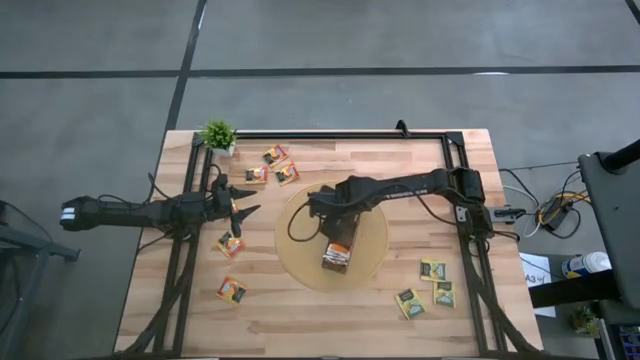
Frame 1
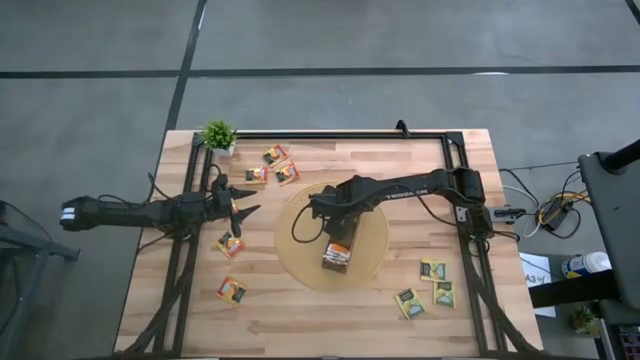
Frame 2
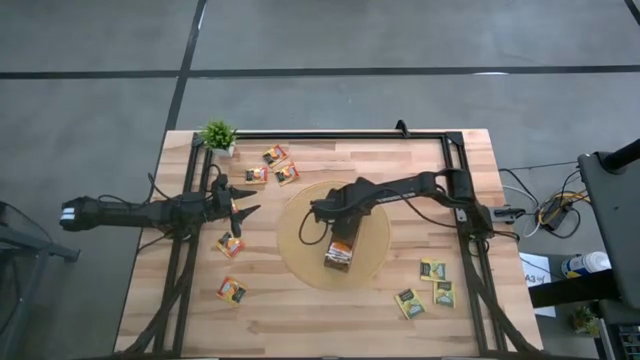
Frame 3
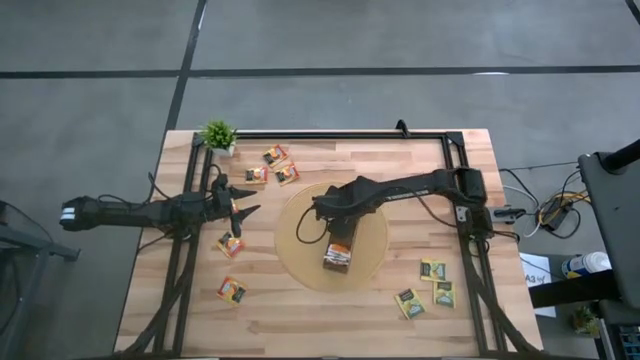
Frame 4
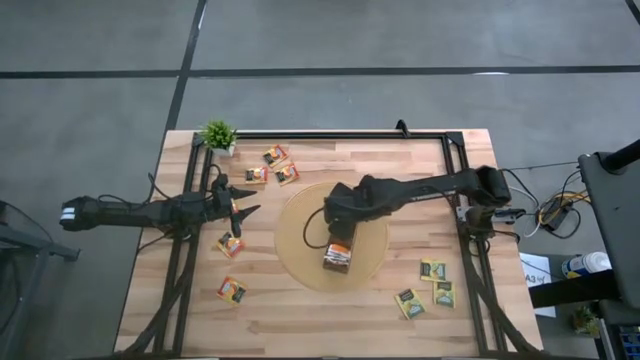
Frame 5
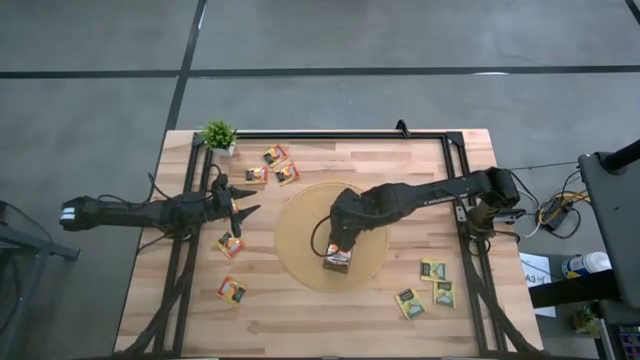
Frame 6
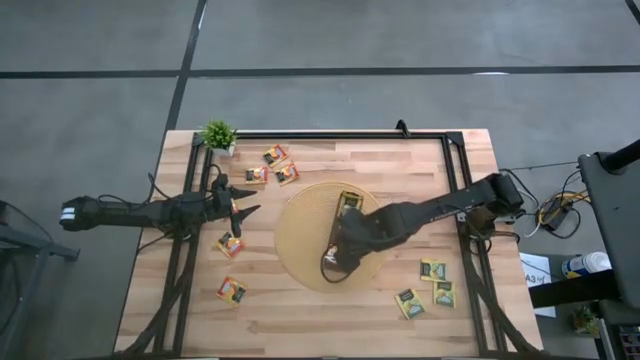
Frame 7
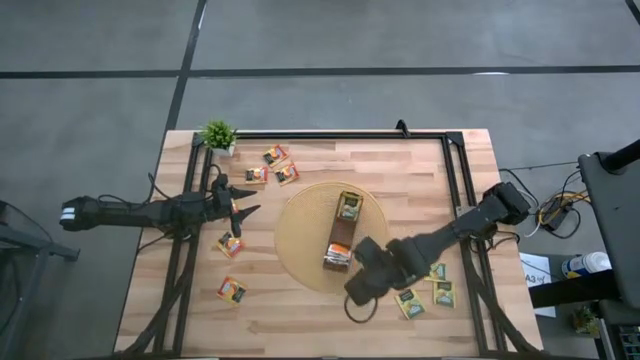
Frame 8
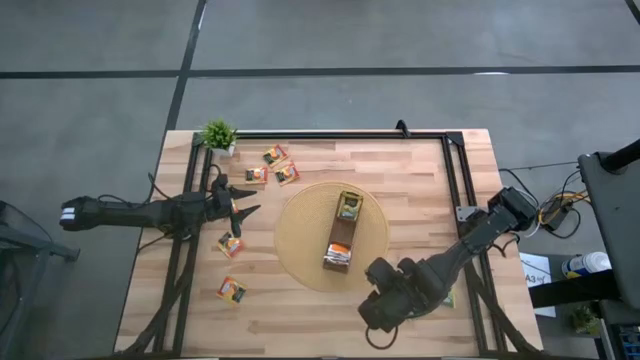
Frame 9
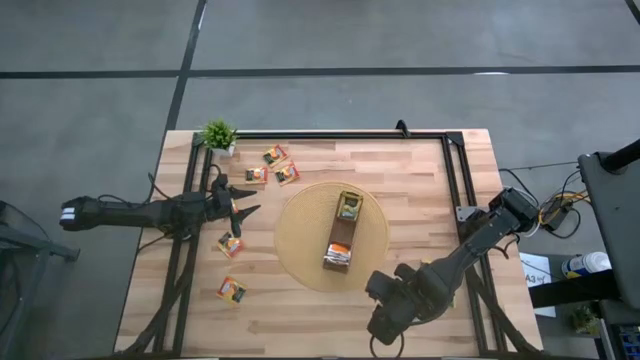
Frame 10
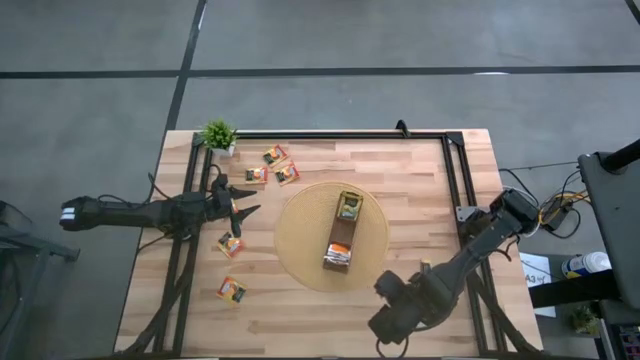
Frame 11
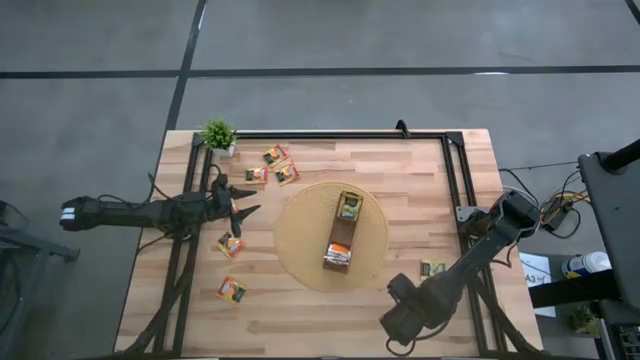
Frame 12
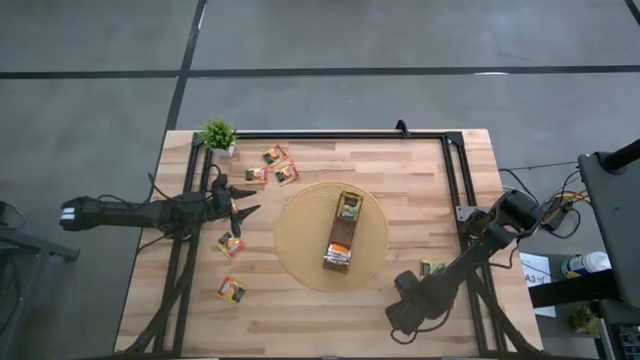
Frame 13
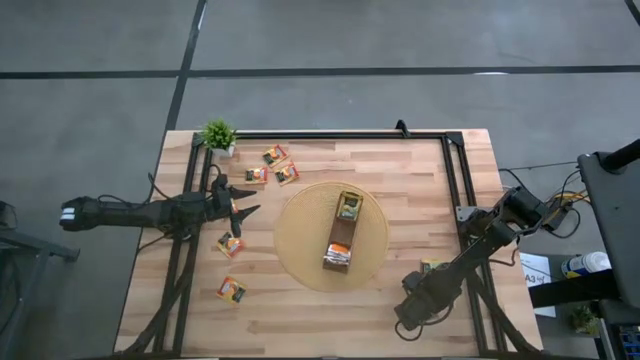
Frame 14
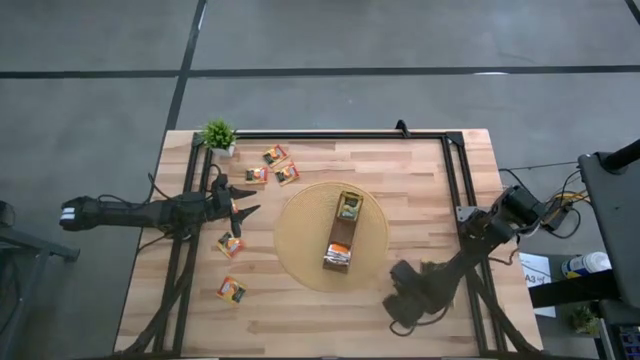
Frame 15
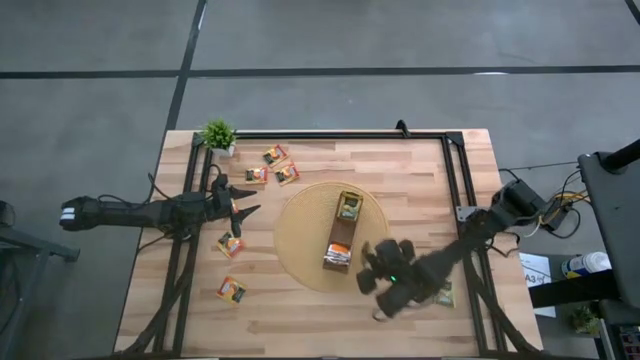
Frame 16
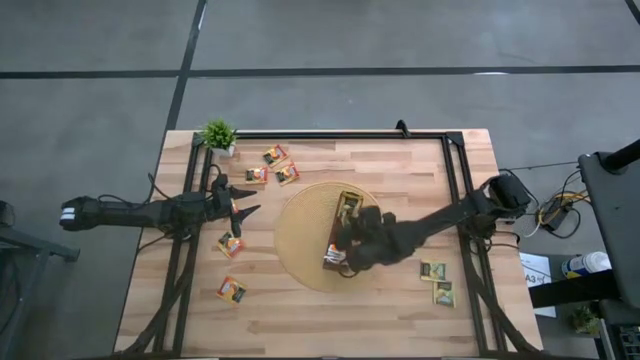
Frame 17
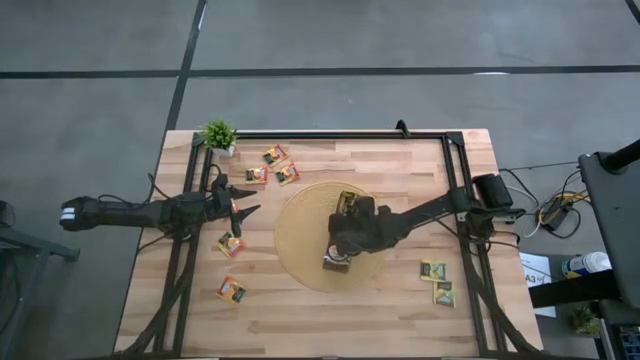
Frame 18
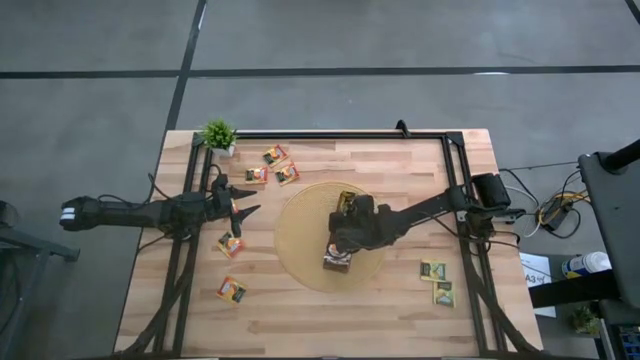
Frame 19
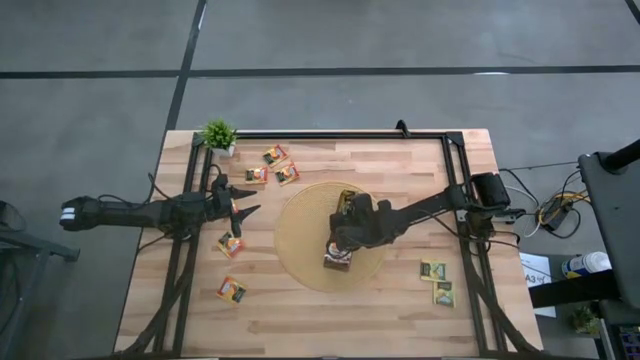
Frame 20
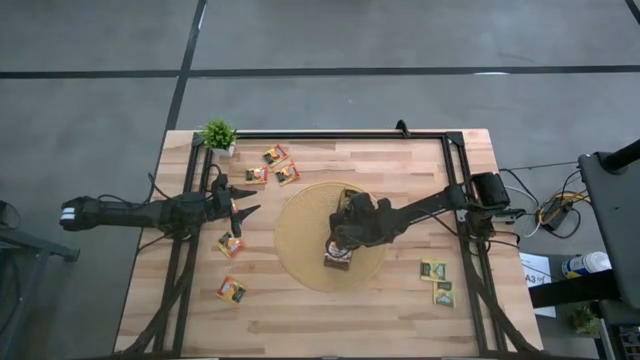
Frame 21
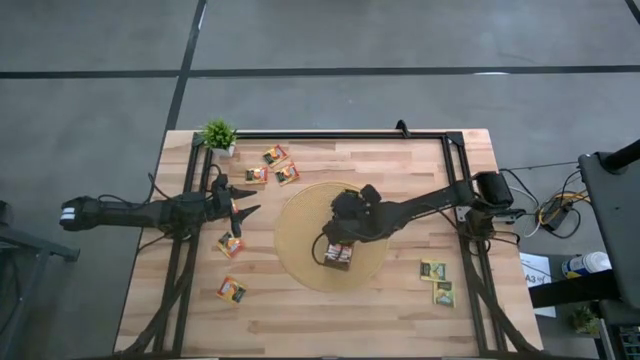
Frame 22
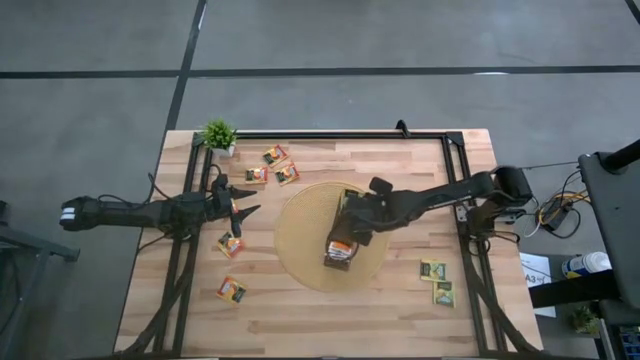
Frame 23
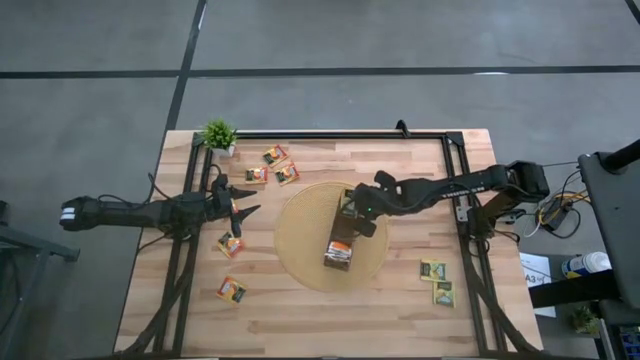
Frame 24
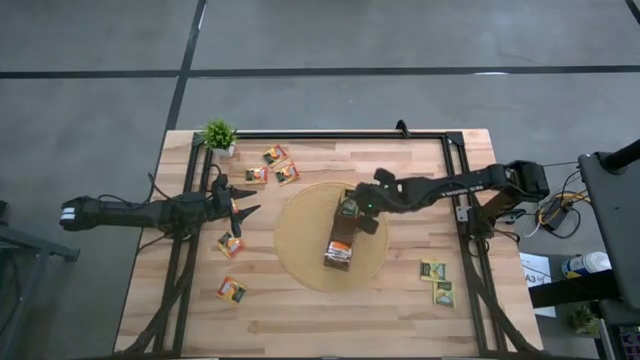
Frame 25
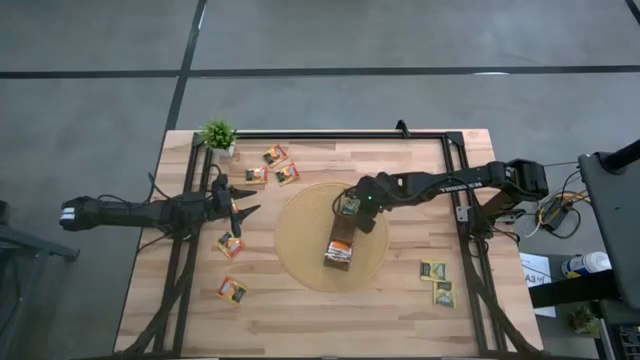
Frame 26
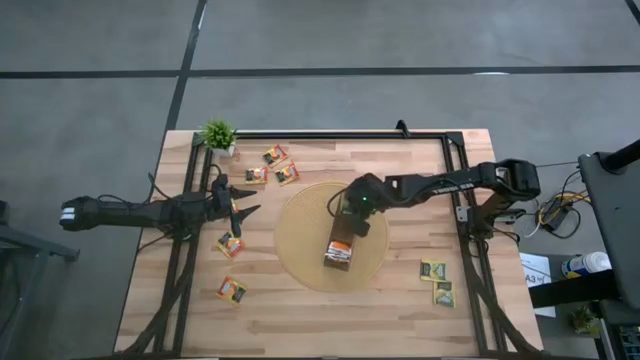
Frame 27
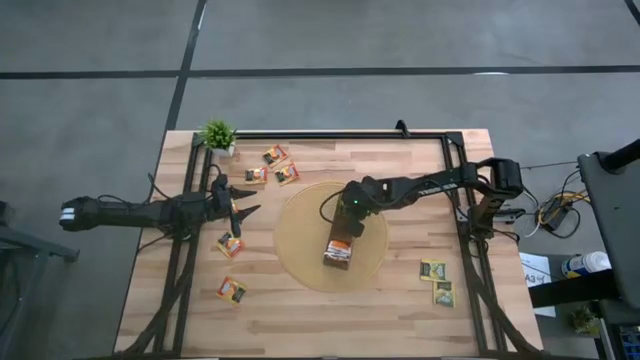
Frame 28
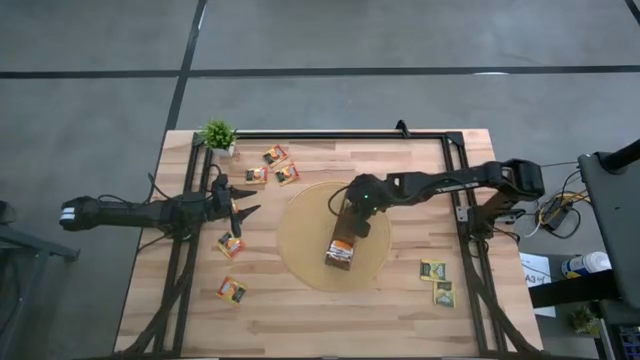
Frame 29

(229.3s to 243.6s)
Task: Pick & Place Tea
Put the left yellow tea bag into the top section of the wooden organizer

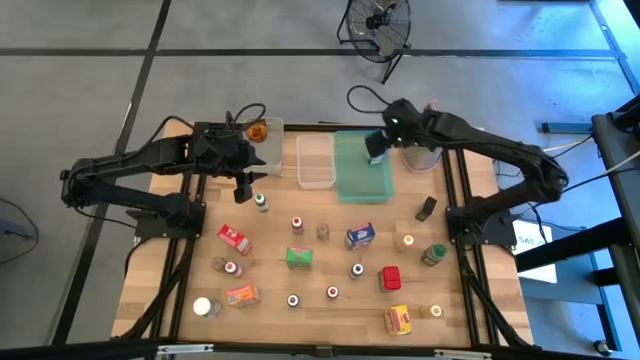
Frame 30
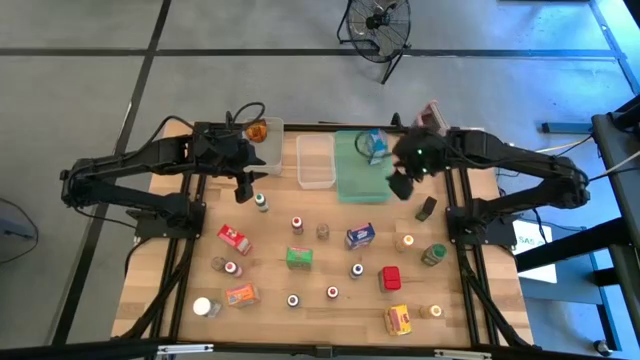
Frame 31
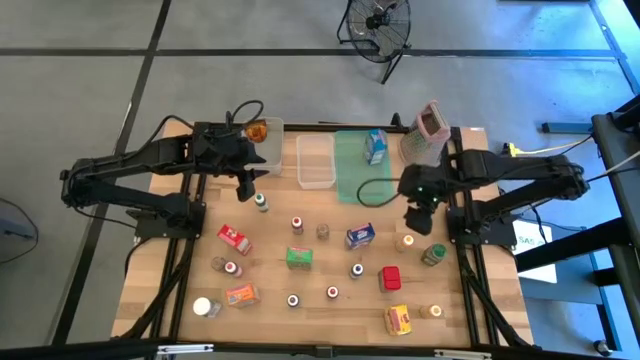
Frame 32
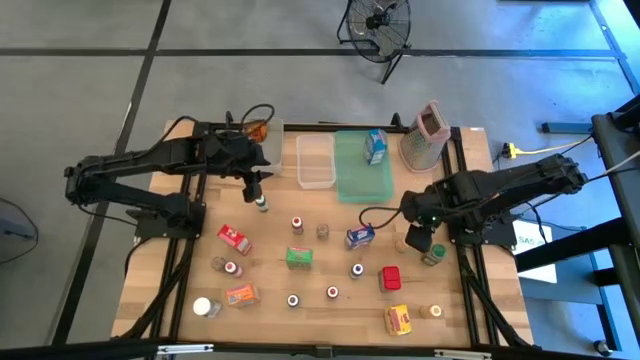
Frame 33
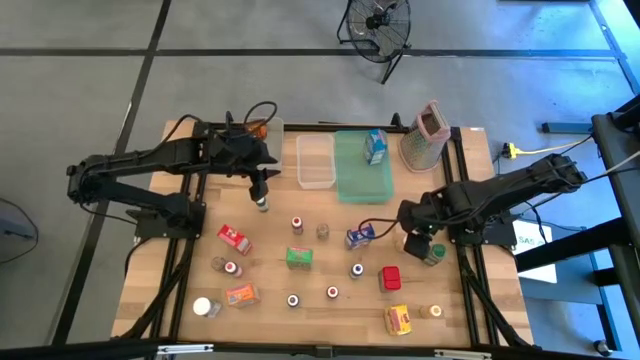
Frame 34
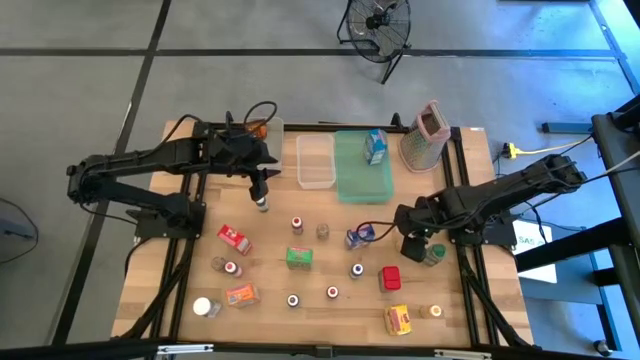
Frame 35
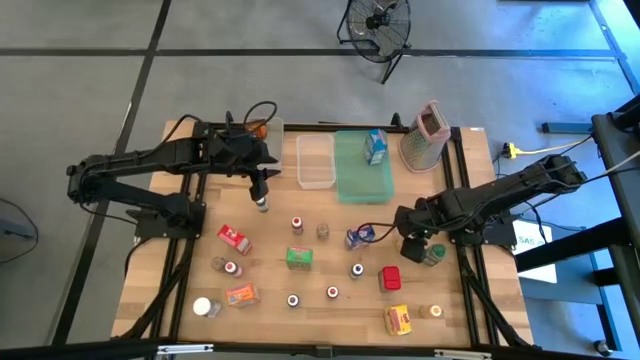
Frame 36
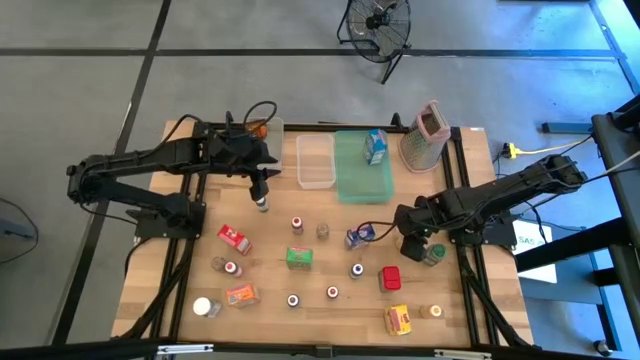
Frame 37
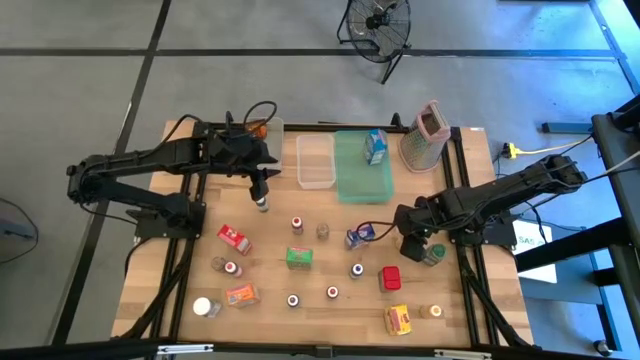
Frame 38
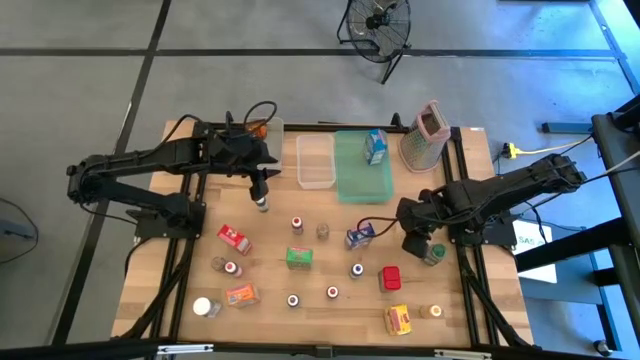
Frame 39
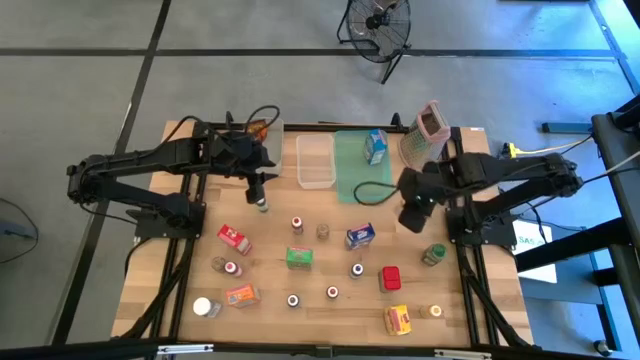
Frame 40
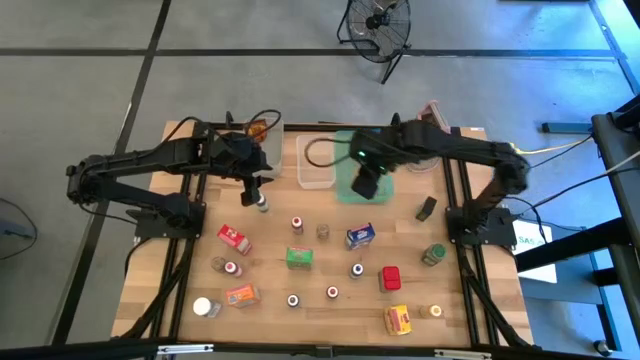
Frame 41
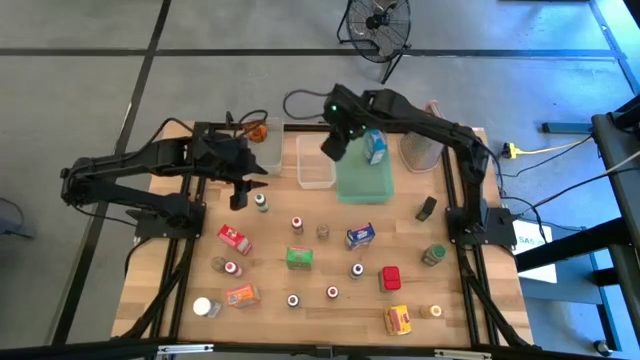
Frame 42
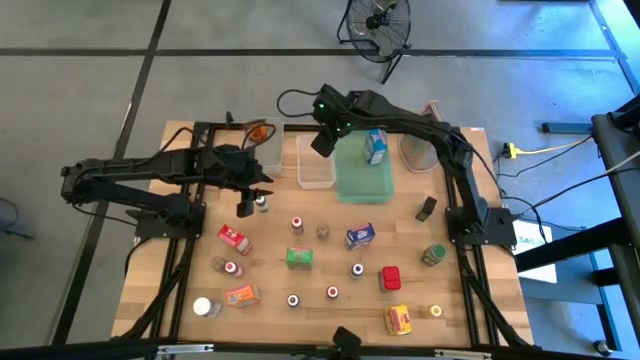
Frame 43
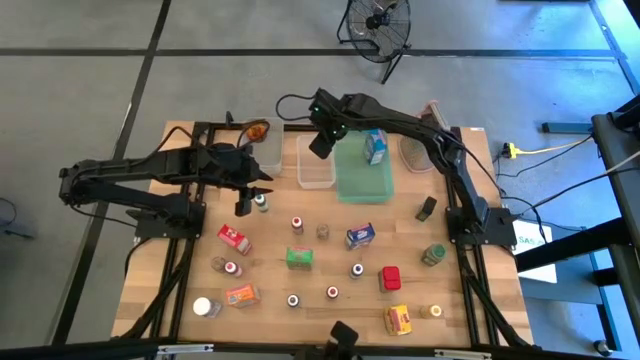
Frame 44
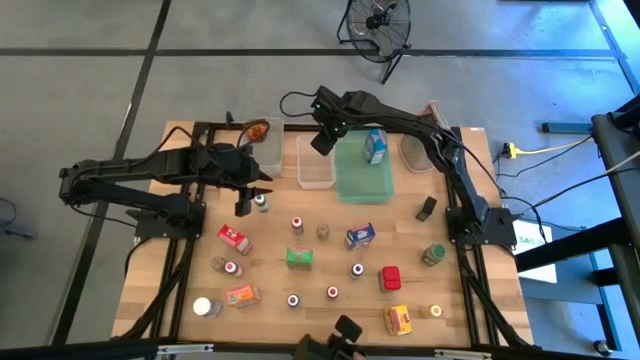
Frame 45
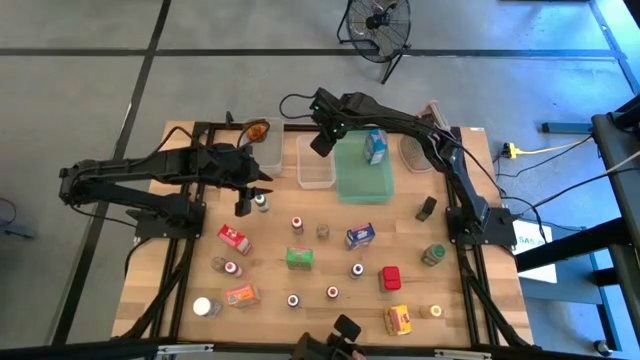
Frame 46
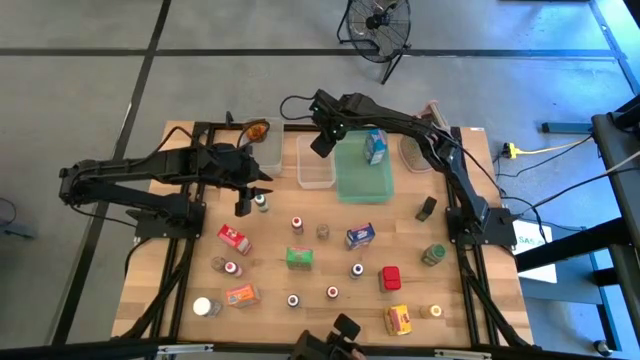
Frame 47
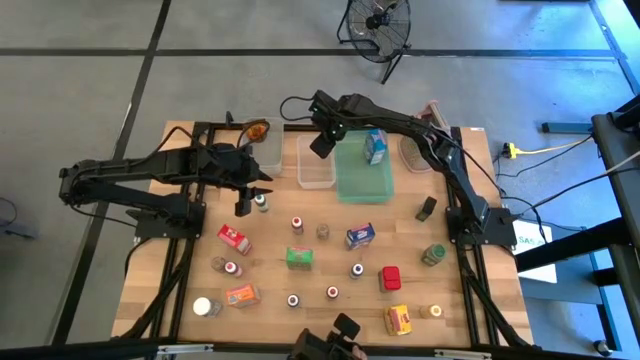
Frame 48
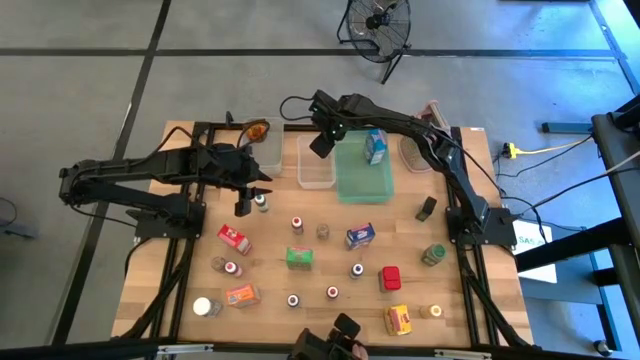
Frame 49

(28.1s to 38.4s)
Task: Pick & Place Kitchen Items
Put the top yellow food coloring bottle into the transparent bin
